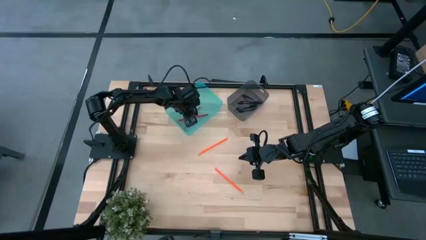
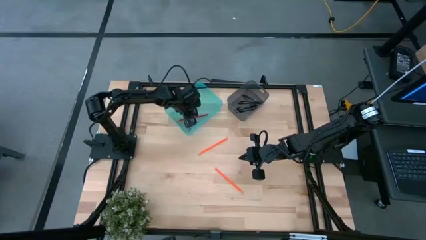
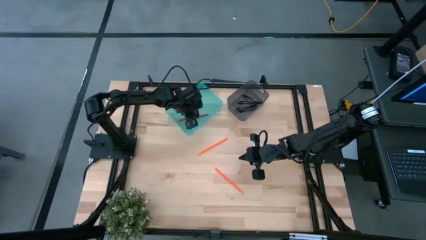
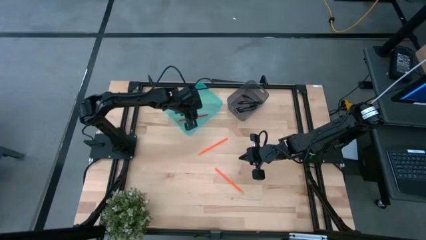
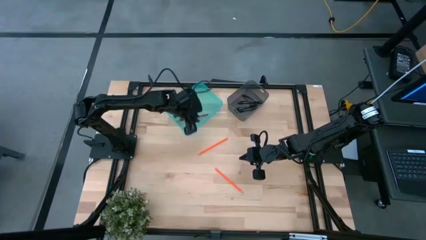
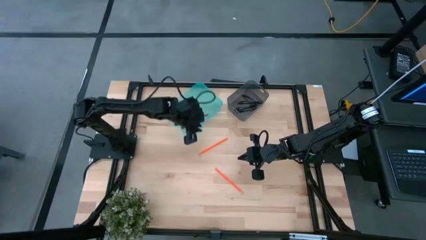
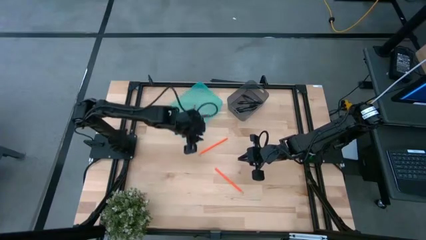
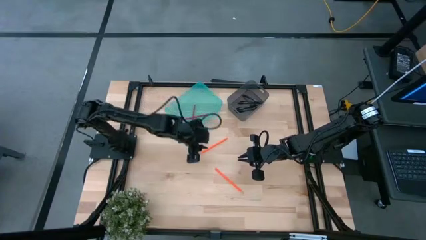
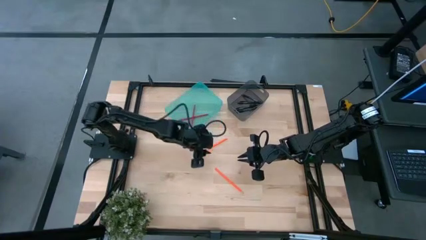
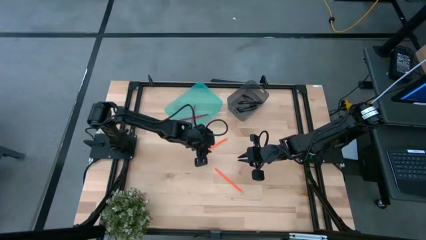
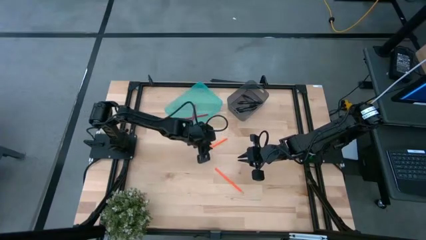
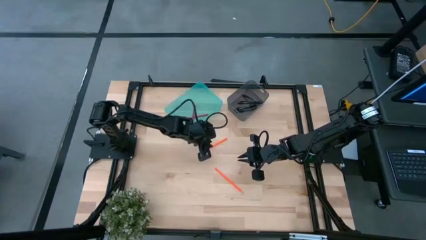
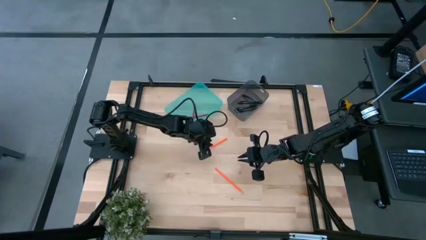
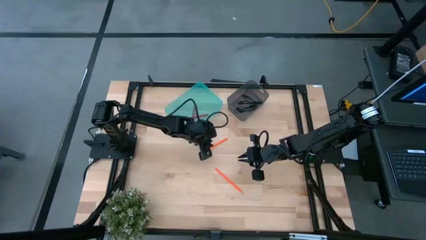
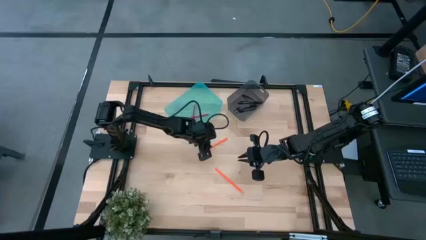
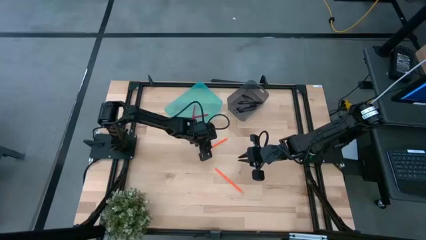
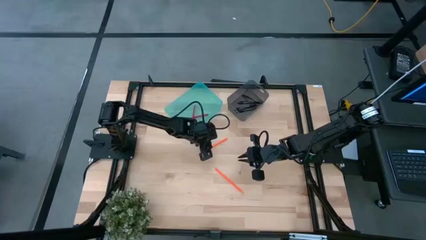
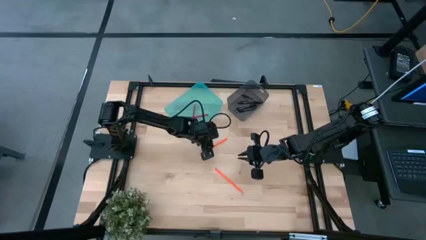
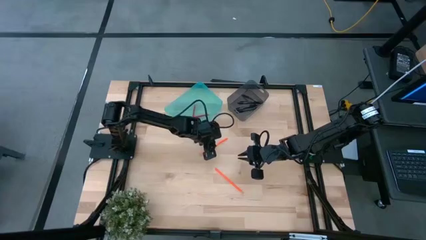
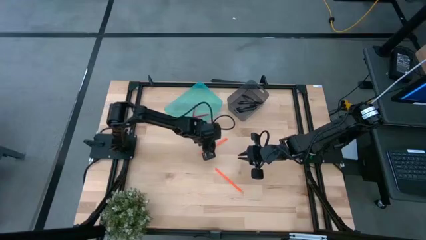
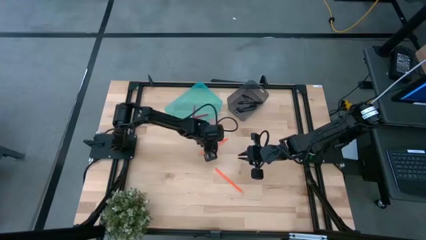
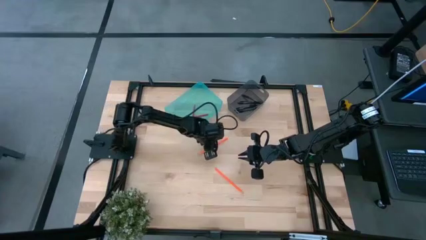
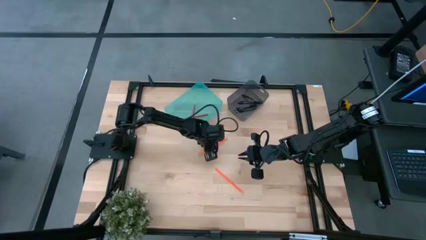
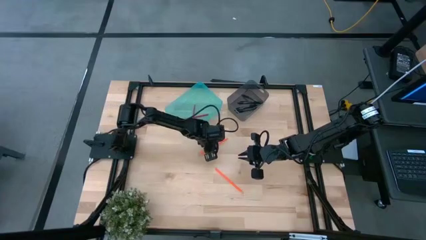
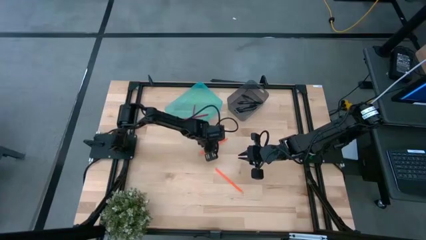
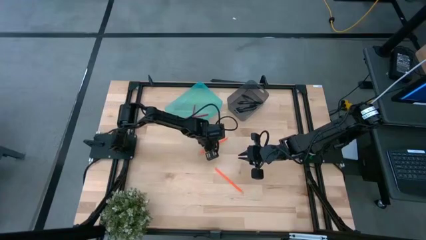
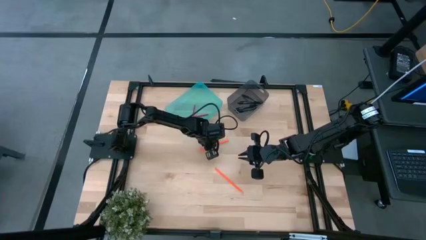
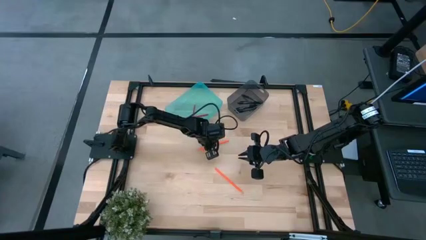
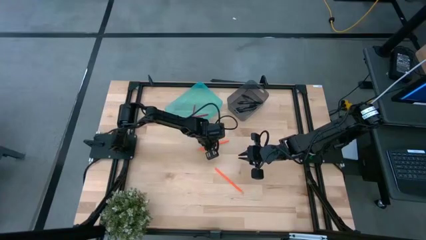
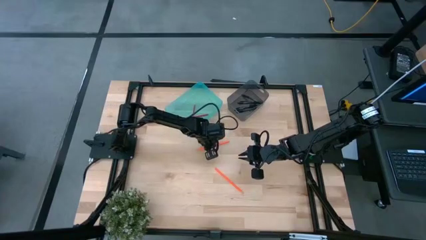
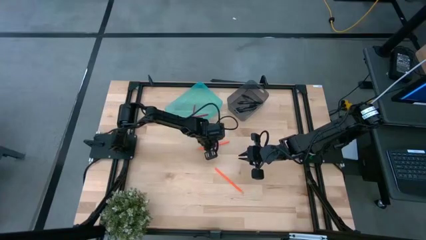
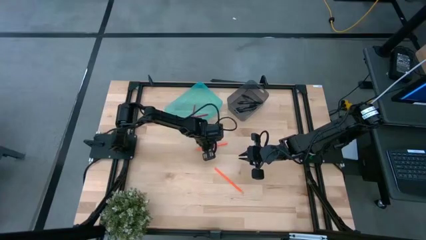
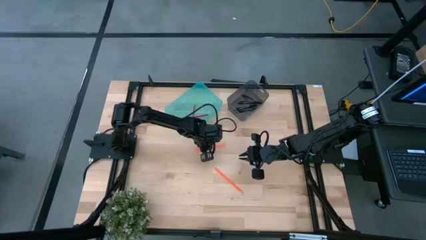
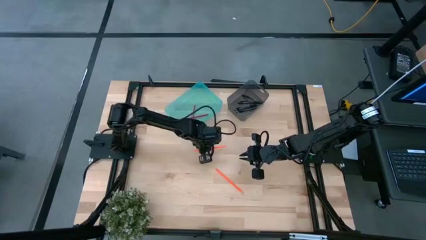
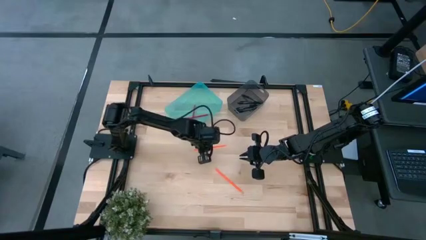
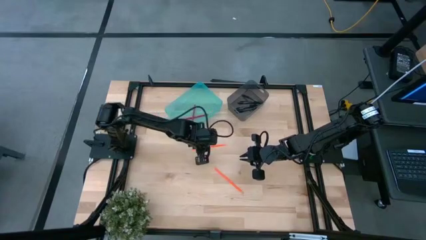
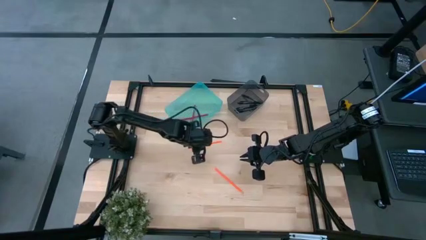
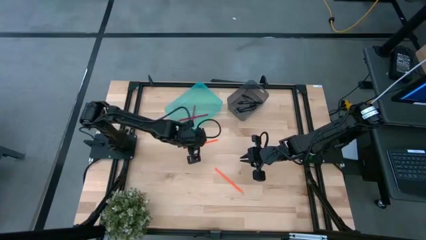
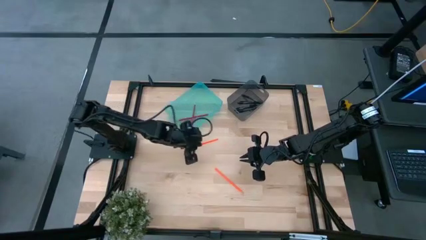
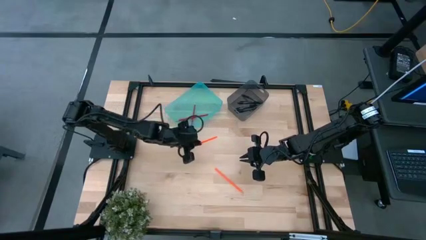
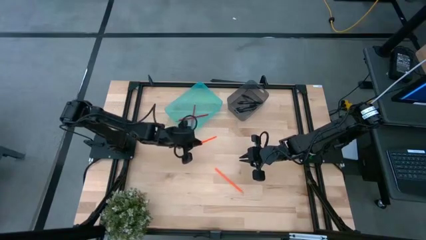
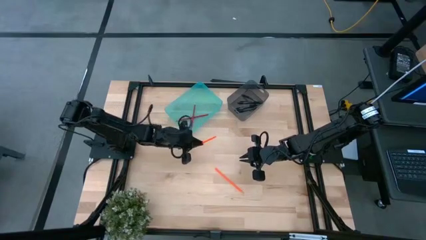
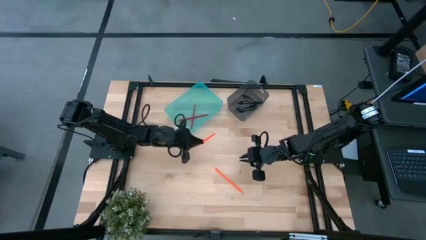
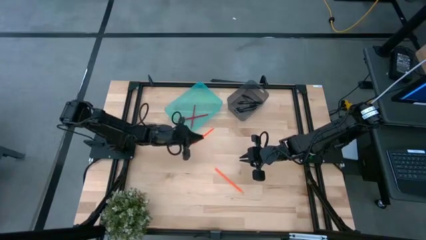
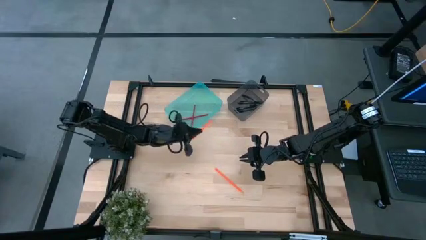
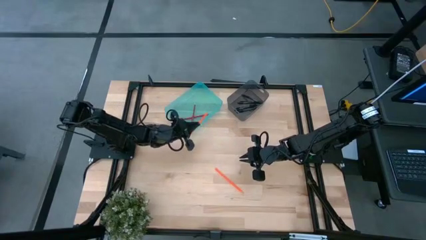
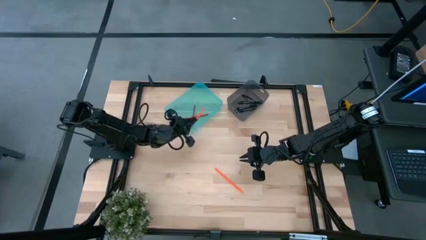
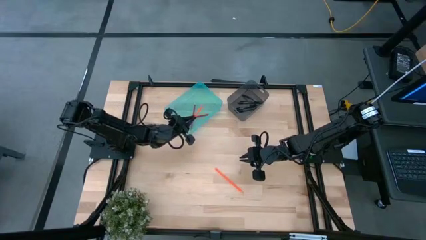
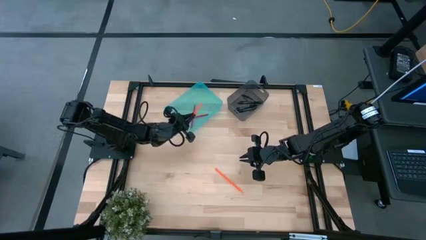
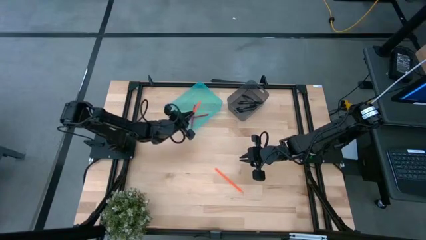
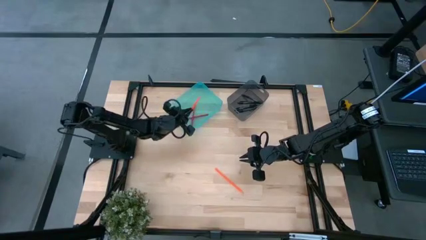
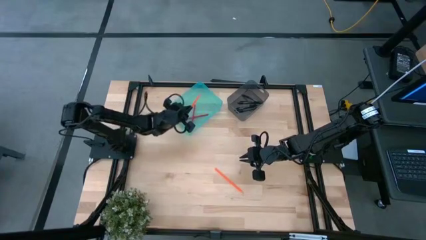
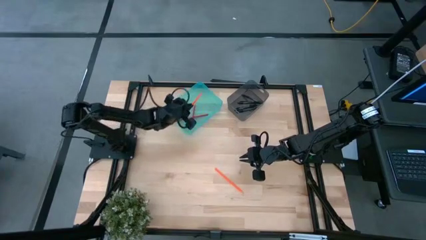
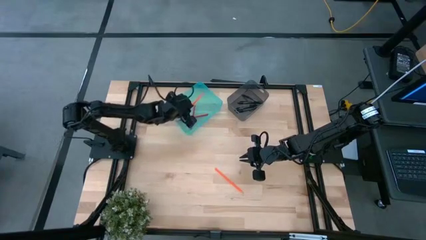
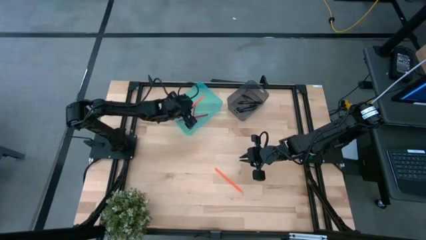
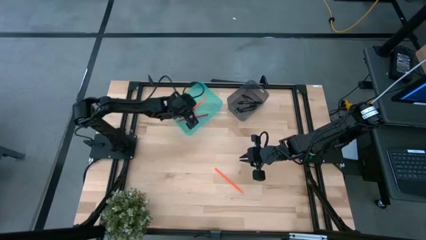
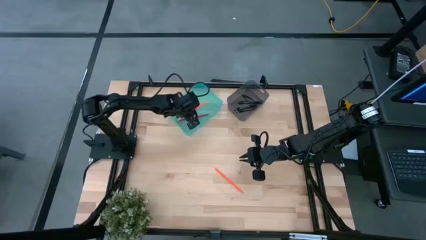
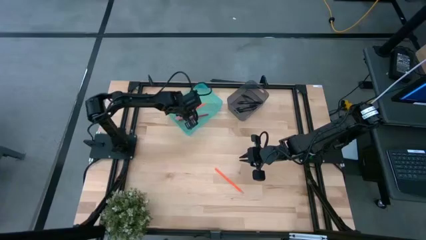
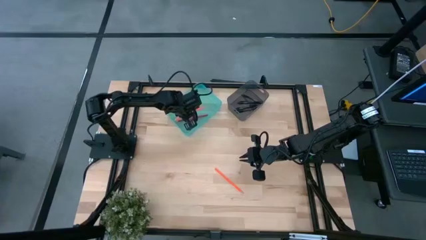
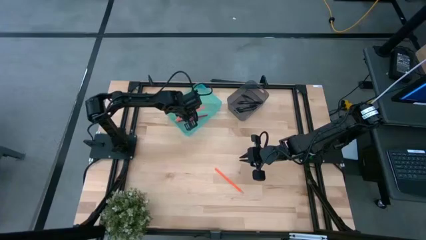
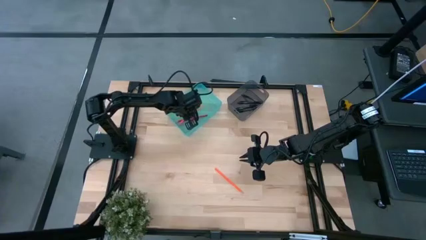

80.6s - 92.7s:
Task: Sort pens & pencils
Put the top orange pencil into the green bin

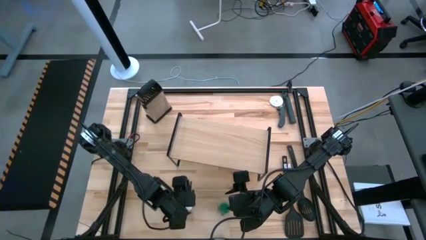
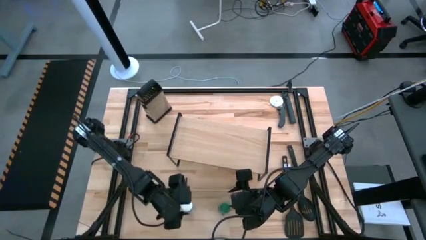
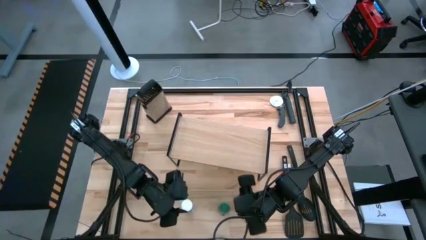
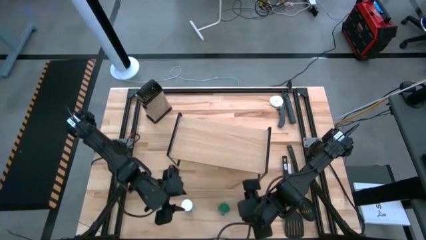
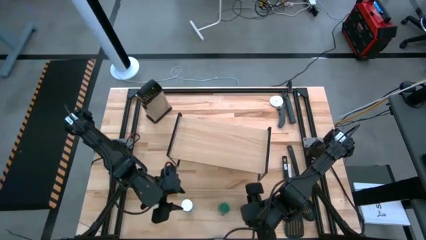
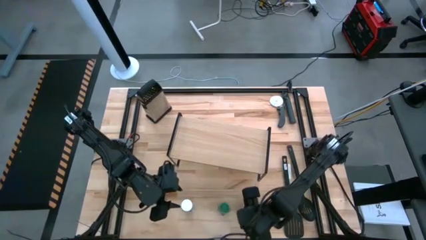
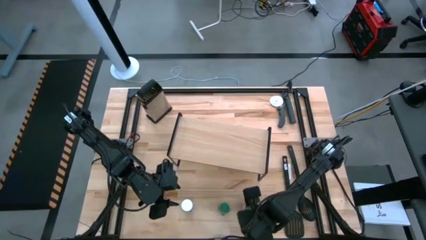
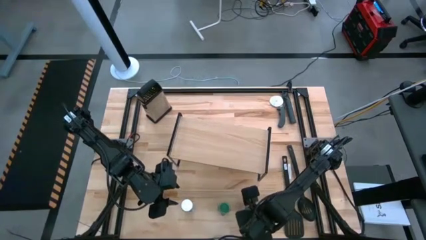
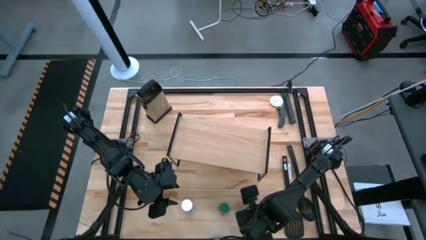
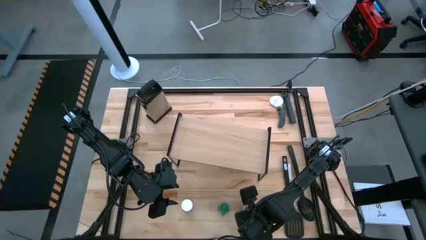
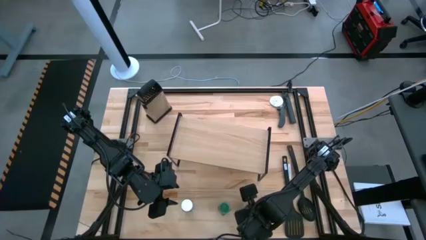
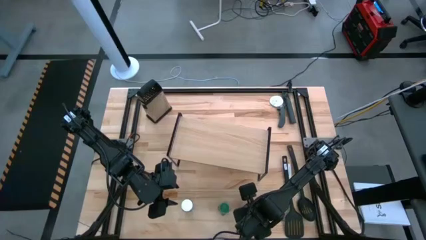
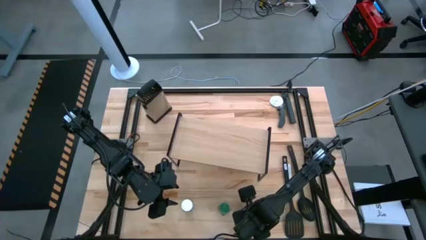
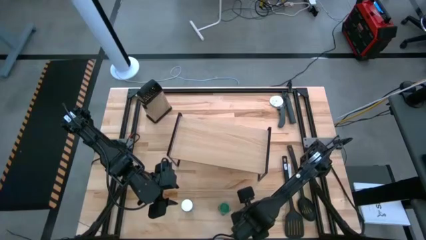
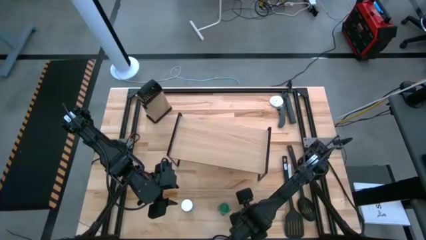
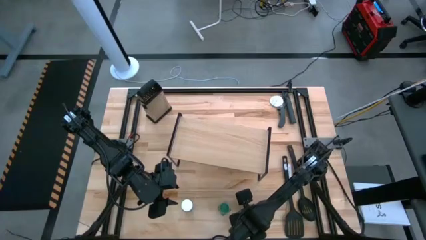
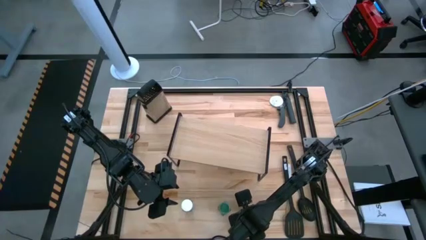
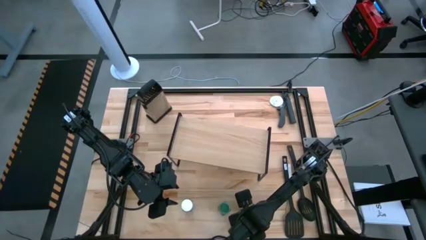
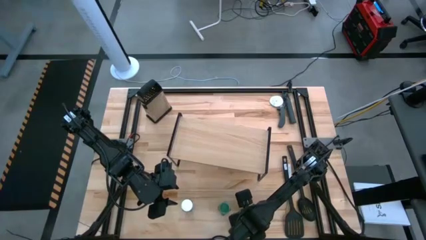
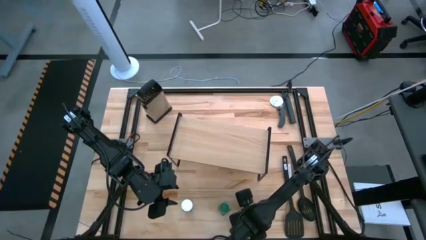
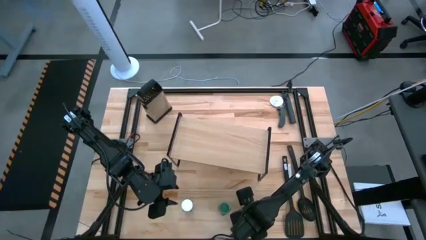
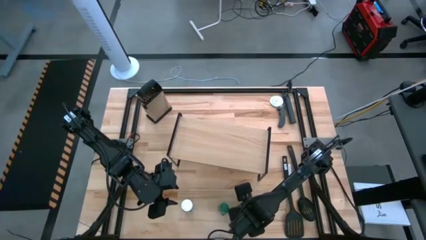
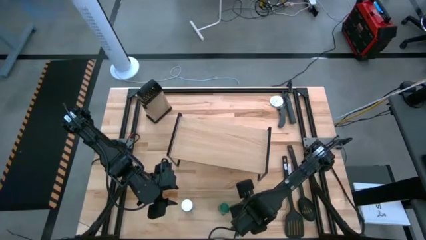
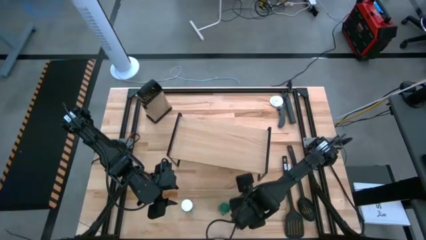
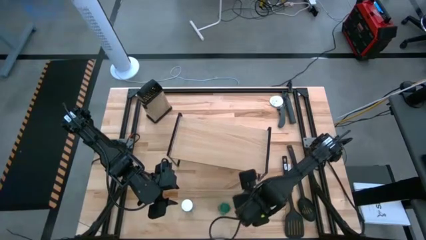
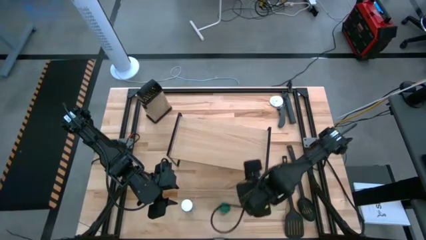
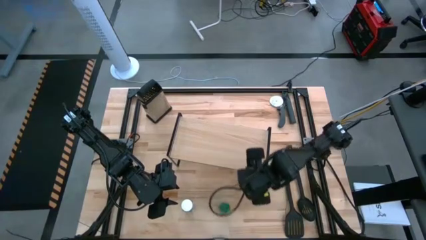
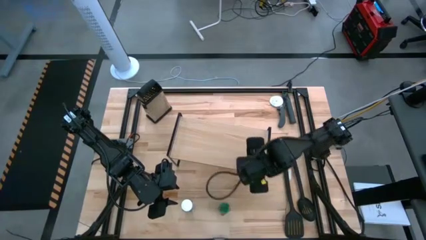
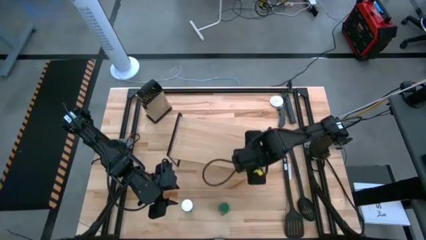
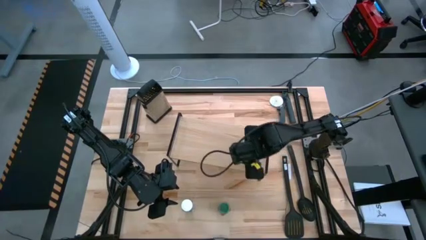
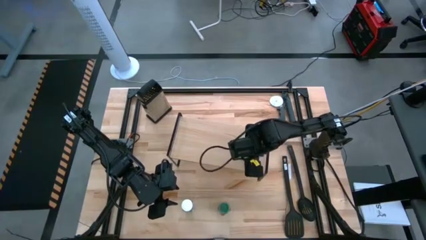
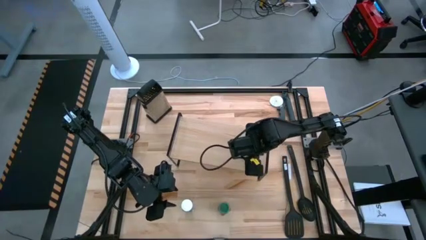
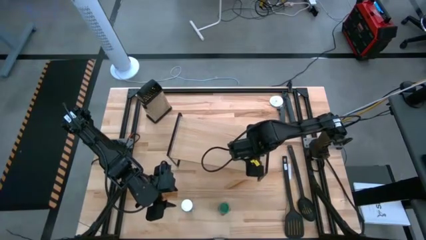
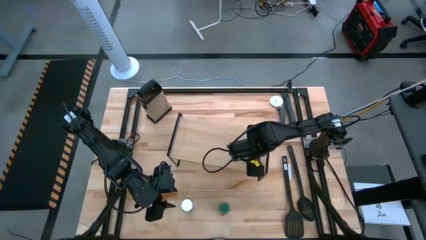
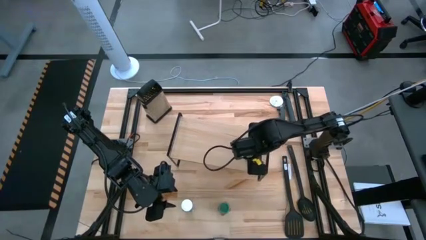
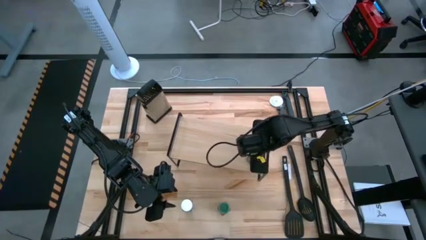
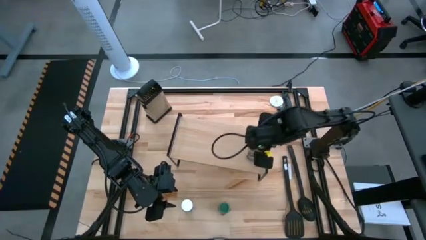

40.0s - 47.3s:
Task: Shelf spices
Put the brown seasoning bottle on the shelf
